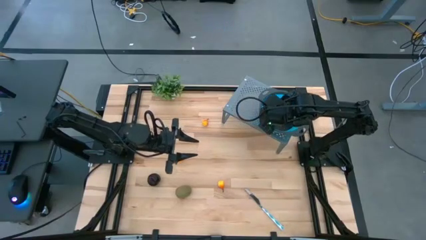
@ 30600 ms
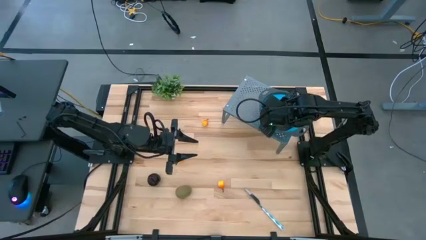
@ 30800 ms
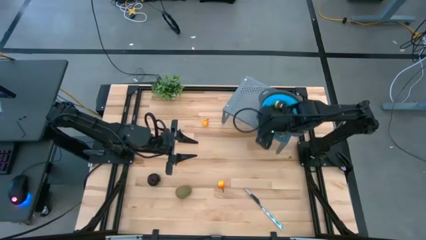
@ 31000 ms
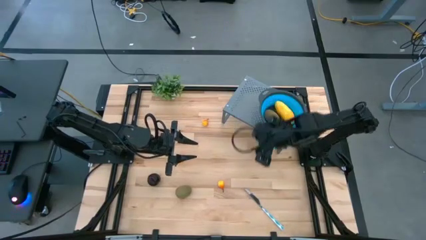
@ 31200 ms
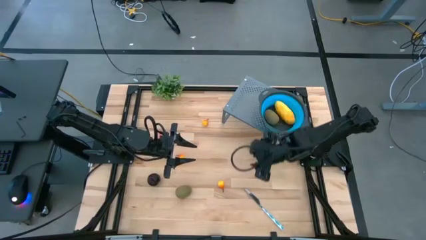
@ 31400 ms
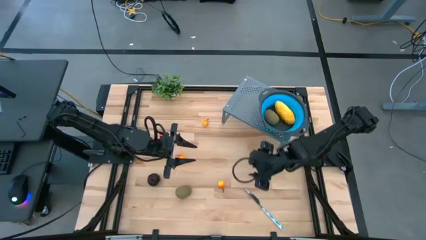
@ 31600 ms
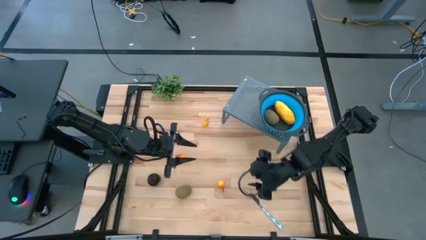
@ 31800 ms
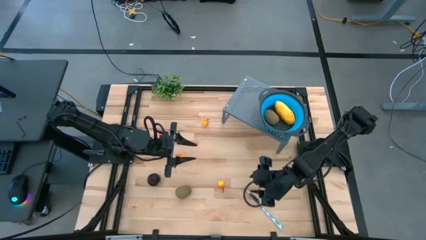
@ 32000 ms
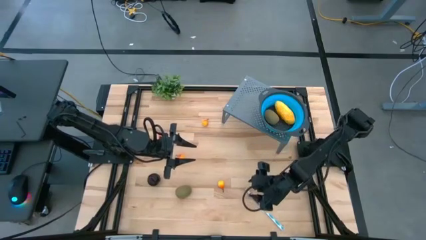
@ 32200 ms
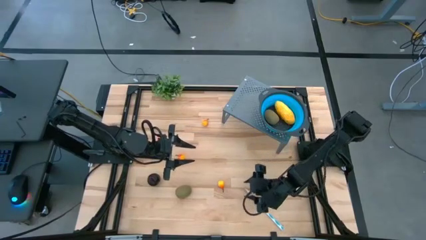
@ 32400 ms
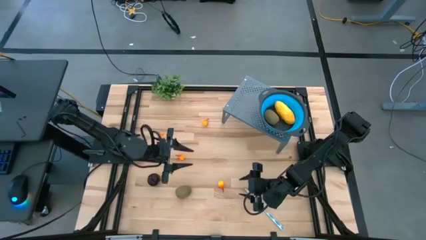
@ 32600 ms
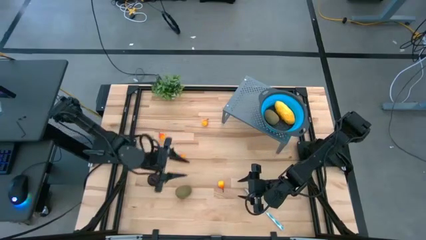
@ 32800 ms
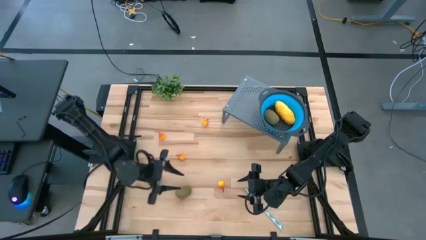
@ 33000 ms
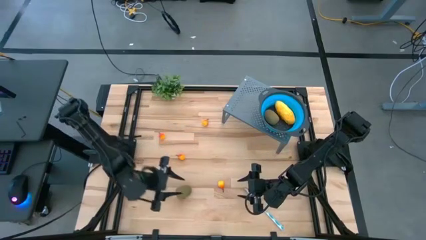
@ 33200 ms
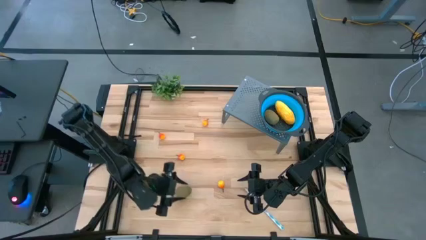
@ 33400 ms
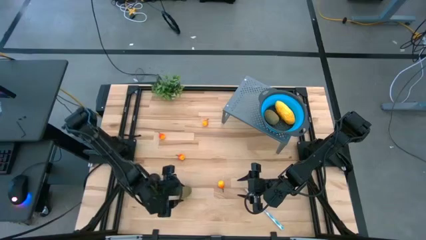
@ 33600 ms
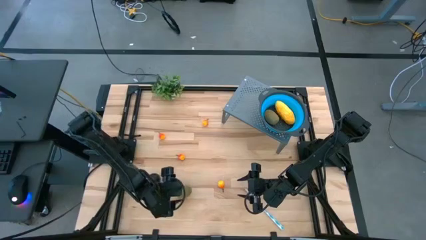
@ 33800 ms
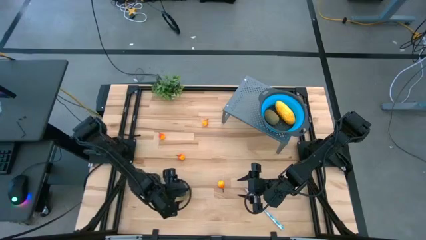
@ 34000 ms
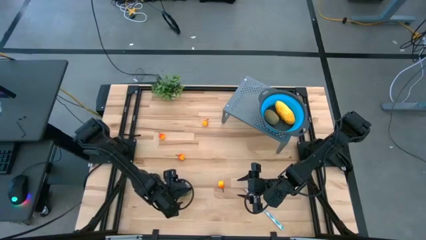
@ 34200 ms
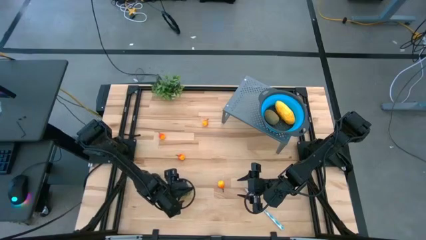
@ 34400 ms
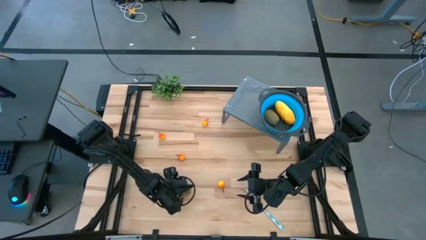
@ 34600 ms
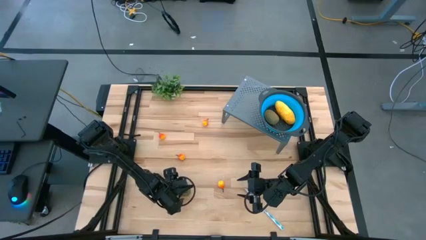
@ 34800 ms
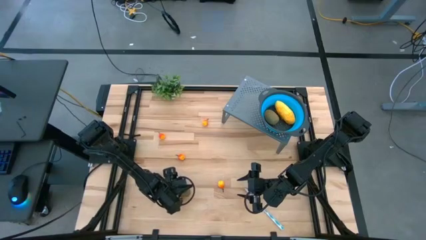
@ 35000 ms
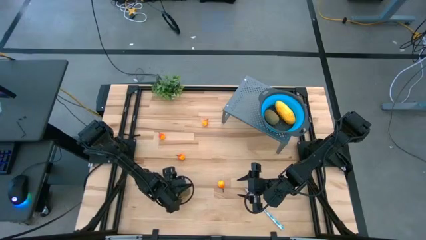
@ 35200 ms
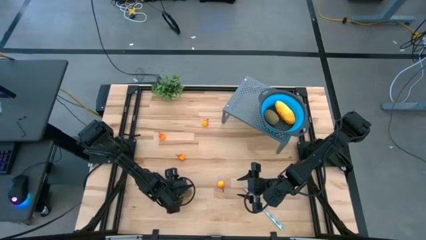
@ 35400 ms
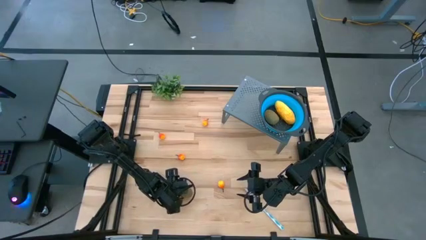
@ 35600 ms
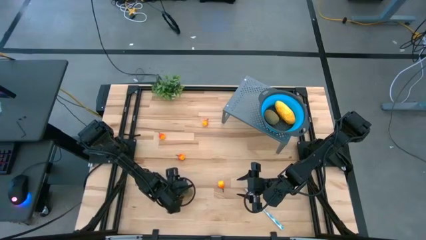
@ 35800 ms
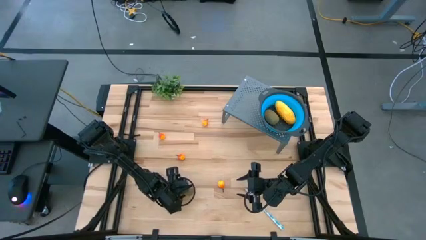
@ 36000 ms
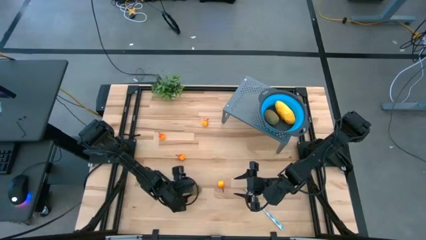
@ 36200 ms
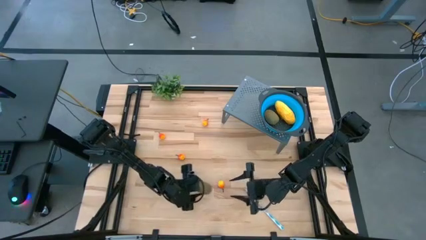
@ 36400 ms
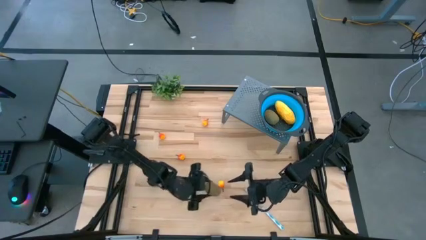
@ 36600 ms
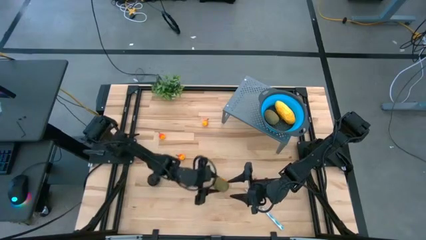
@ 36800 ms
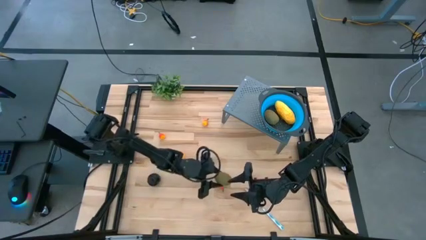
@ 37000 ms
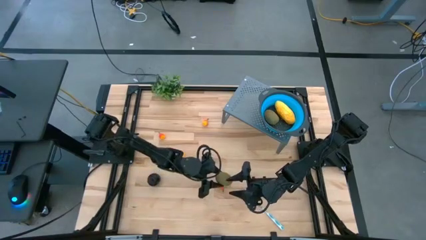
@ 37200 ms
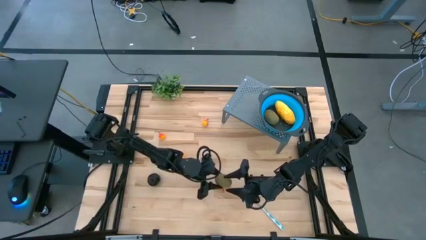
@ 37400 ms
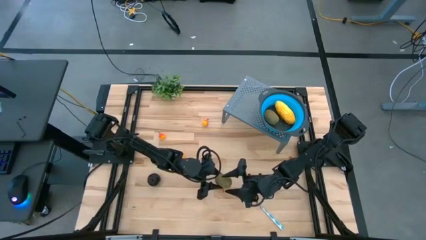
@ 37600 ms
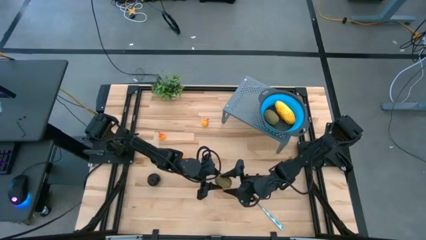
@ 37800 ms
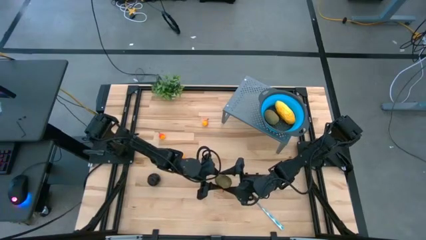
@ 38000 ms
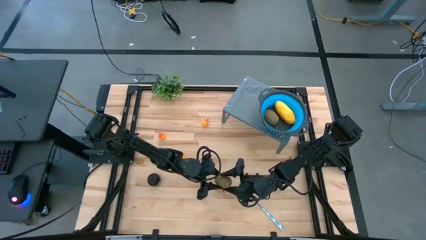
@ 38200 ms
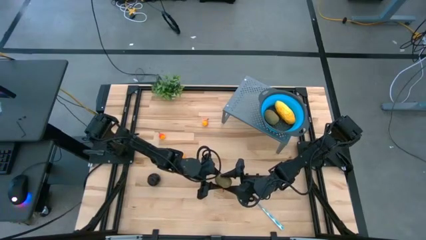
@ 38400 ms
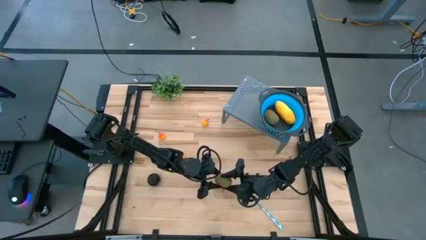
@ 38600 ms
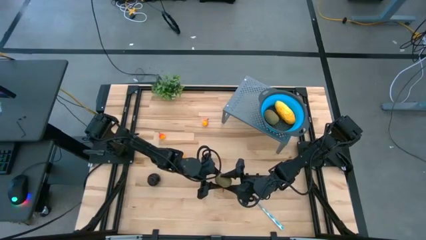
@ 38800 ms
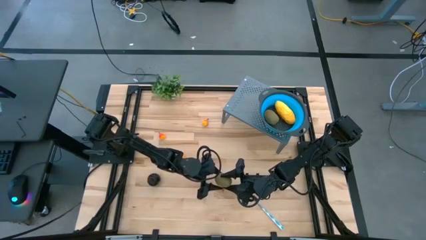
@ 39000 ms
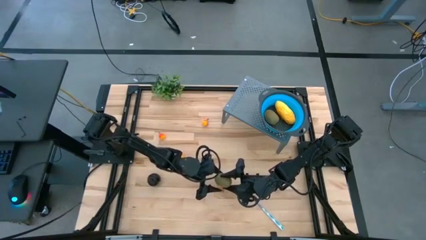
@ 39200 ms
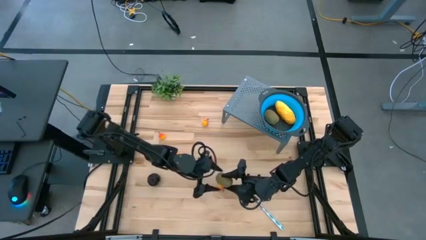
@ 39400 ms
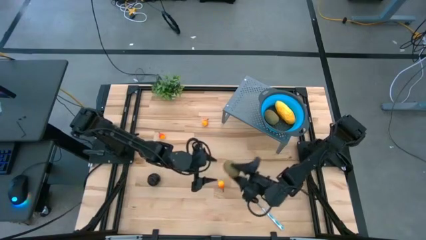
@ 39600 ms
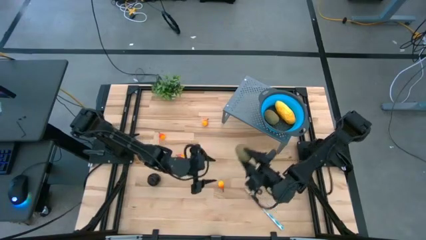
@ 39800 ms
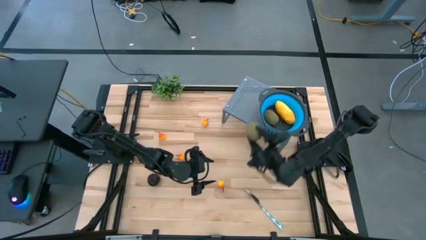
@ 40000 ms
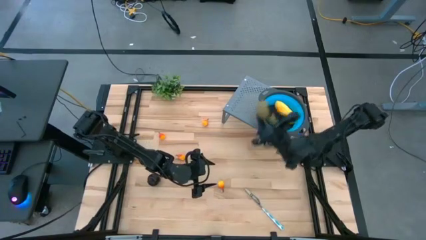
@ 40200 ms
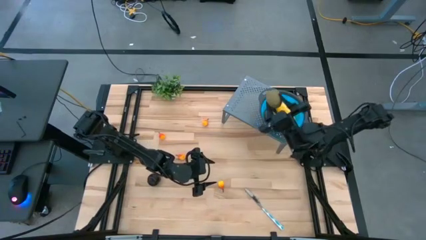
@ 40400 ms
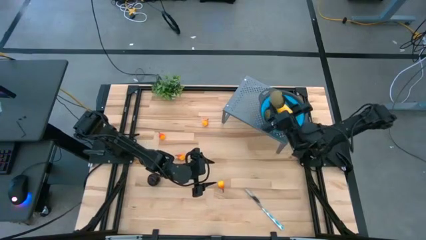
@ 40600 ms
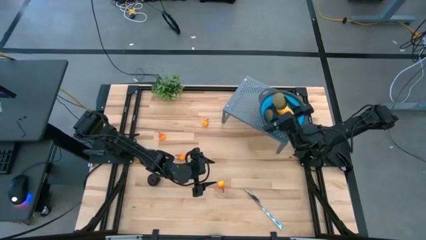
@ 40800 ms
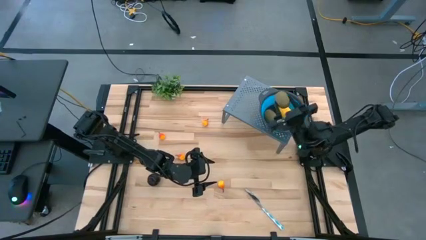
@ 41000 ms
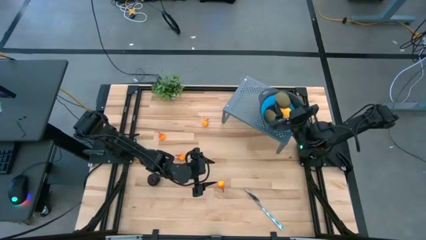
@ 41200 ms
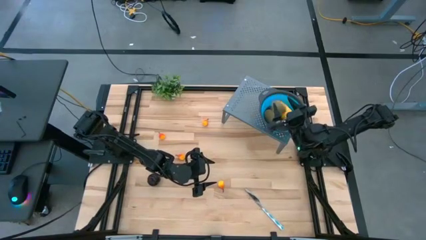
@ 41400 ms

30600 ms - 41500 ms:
Task: Pick & Place Fruit
Put the kiwi into the strainer bowl on the shelf

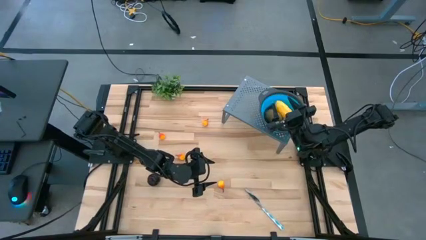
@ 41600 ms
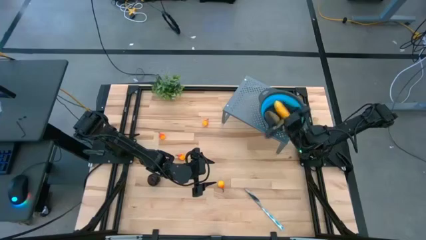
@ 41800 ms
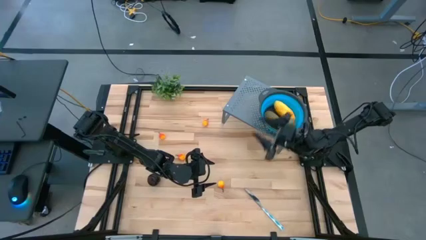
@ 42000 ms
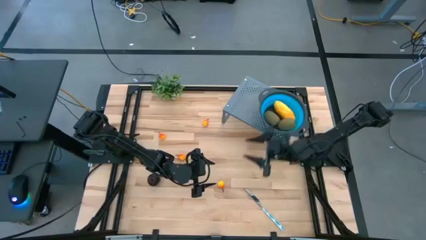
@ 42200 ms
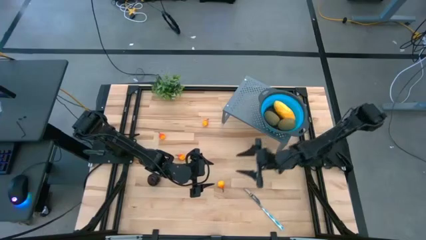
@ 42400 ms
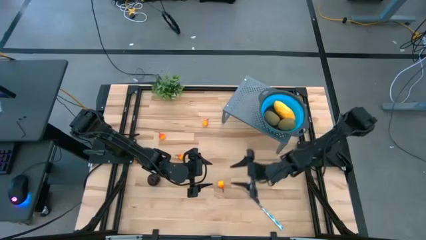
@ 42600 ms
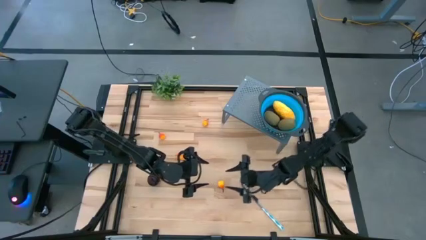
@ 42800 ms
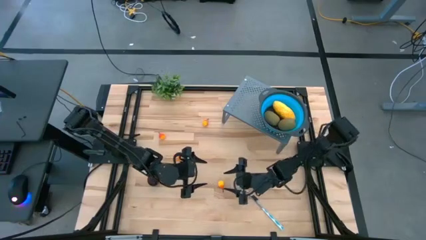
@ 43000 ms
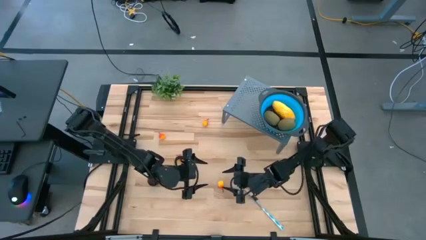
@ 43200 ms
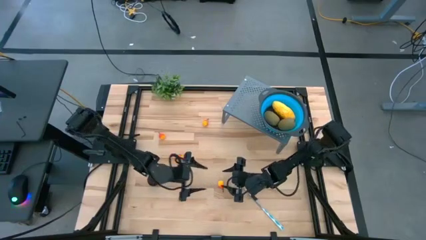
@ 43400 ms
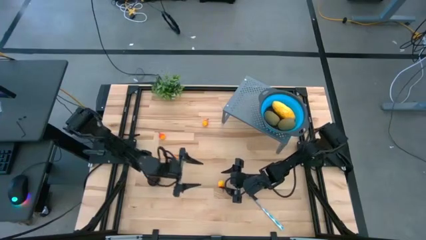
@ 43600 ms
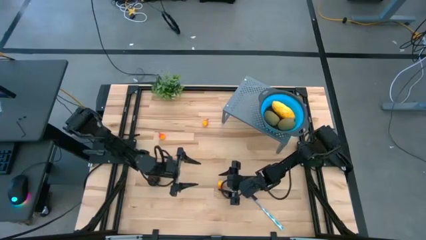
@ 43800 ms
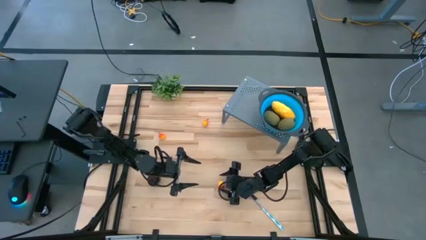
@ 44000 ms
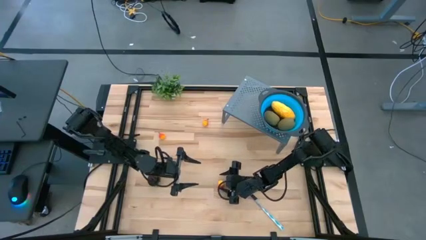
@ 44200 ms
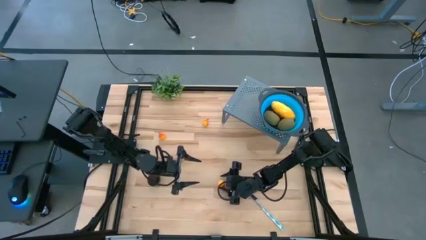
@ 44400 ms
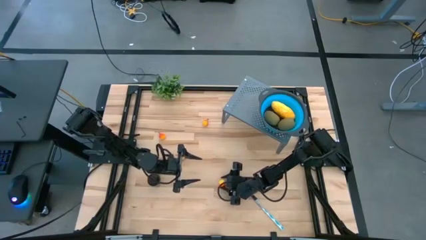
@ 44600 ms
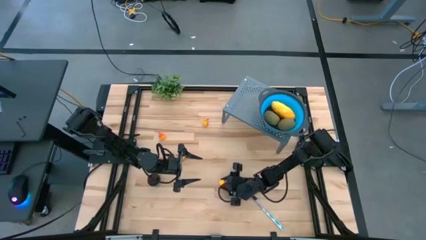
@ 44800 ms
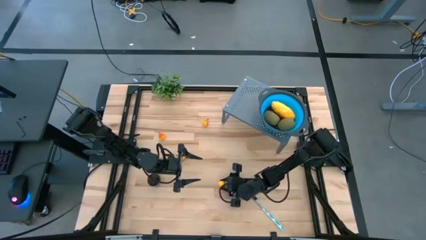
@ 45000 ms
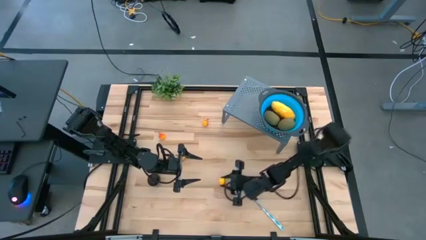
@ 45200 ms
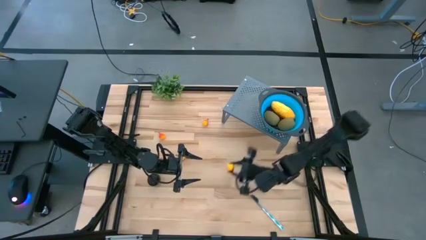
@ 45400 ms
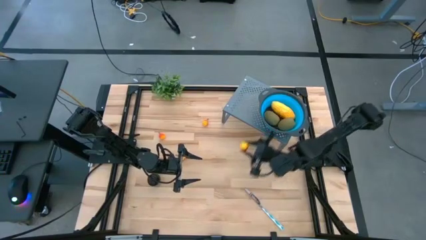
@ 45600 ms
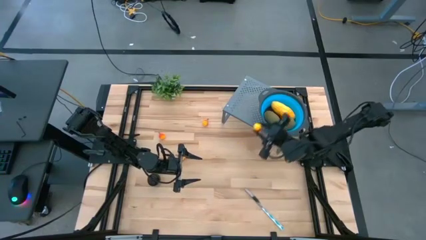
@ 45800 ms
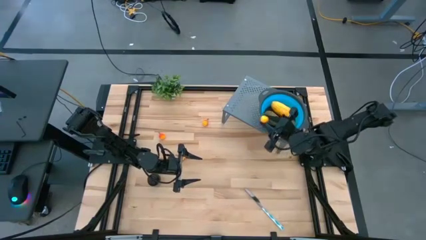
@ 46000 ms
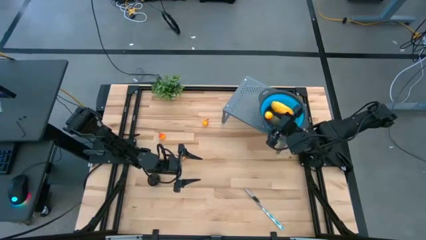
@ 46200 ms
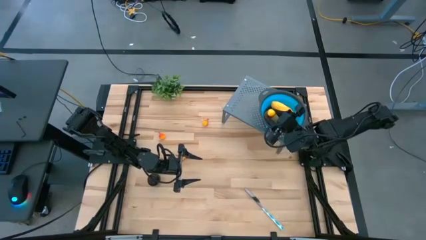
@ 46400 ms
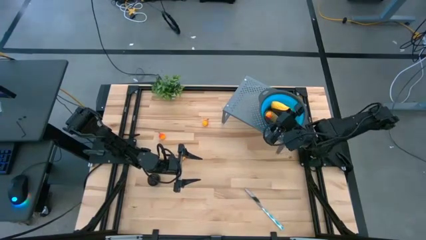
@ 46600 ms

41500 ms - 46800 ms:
Put the pear into the strainer bowl on the shelf
